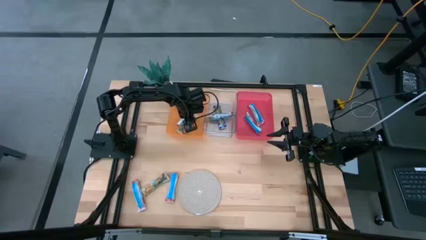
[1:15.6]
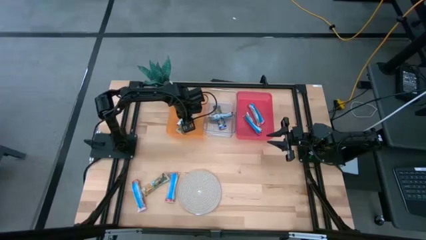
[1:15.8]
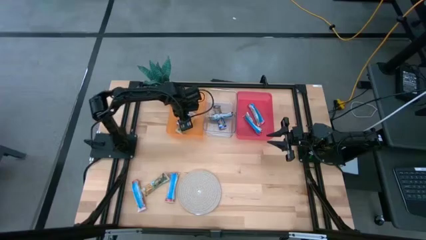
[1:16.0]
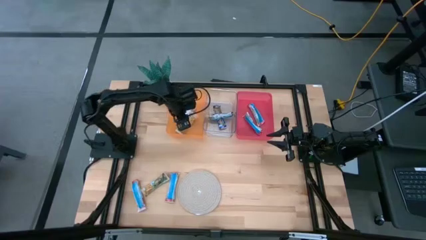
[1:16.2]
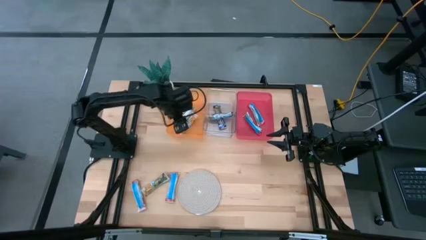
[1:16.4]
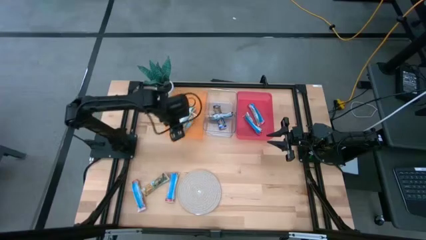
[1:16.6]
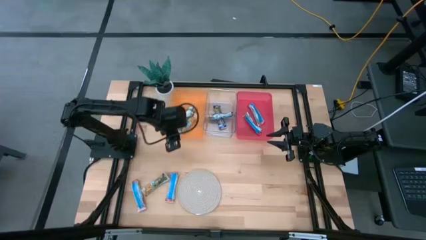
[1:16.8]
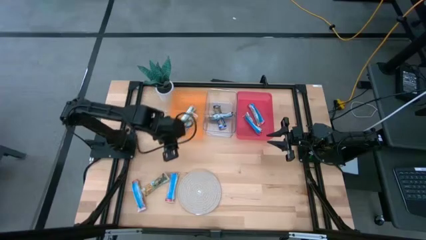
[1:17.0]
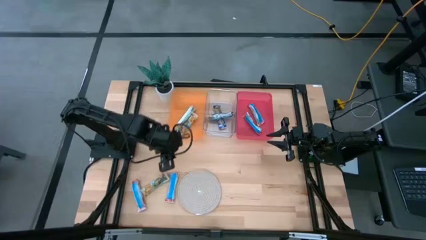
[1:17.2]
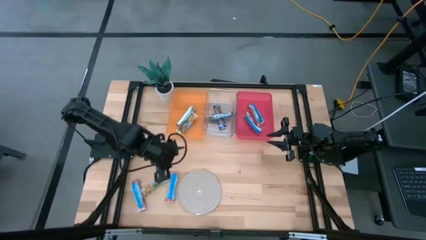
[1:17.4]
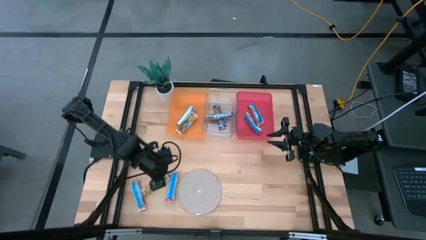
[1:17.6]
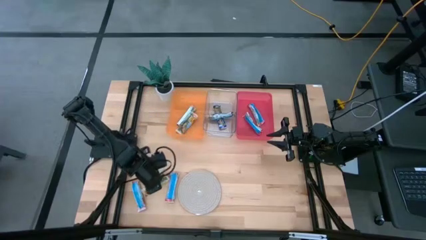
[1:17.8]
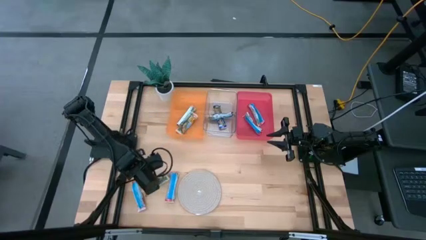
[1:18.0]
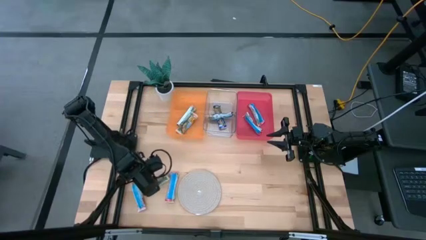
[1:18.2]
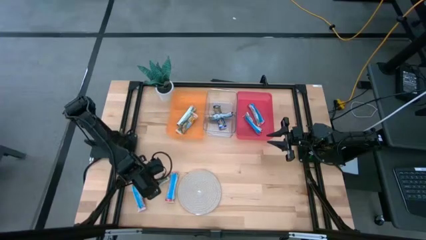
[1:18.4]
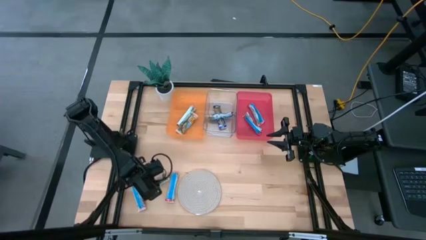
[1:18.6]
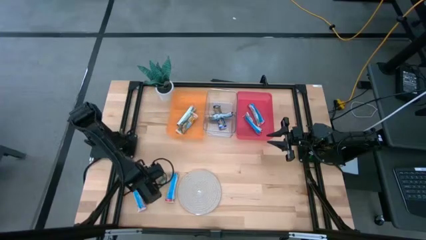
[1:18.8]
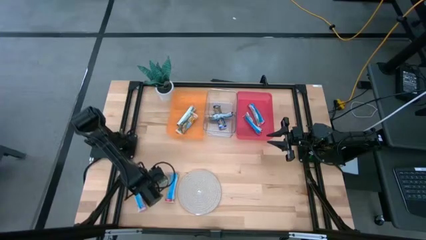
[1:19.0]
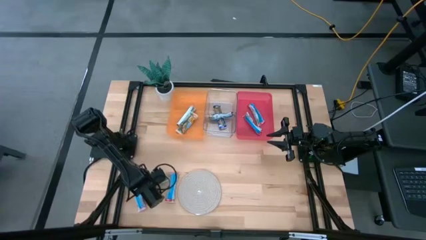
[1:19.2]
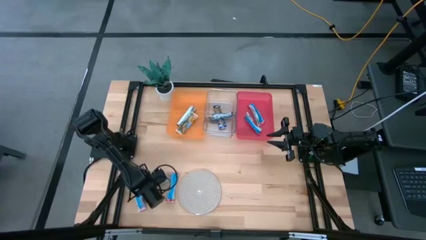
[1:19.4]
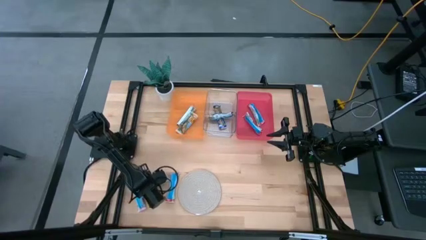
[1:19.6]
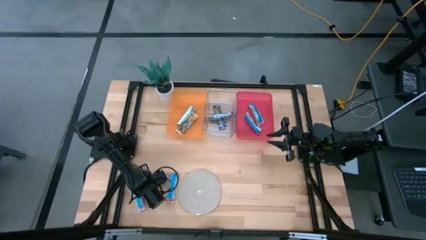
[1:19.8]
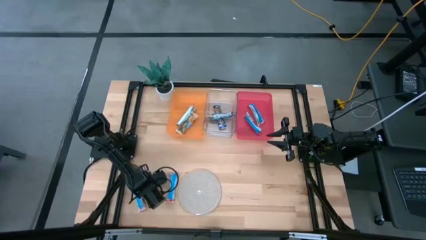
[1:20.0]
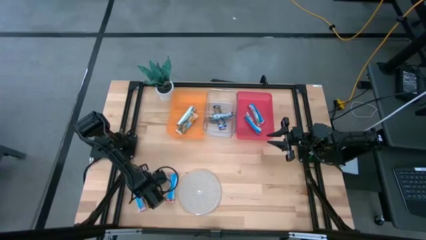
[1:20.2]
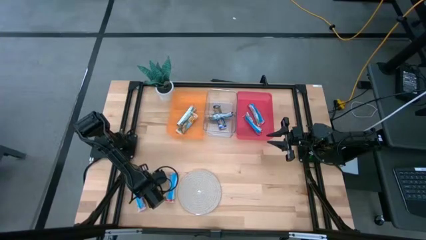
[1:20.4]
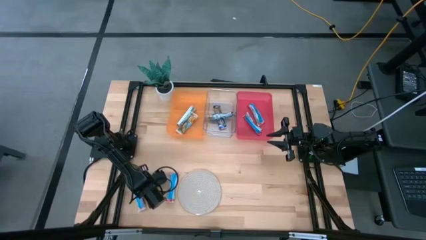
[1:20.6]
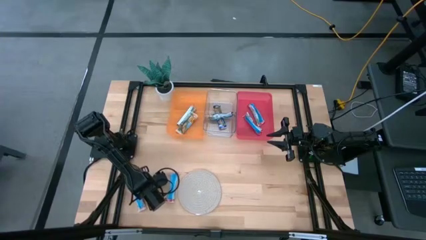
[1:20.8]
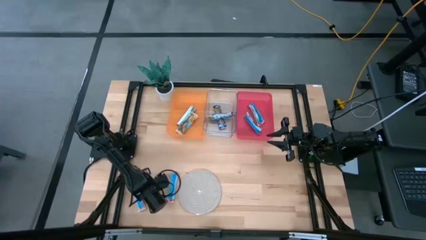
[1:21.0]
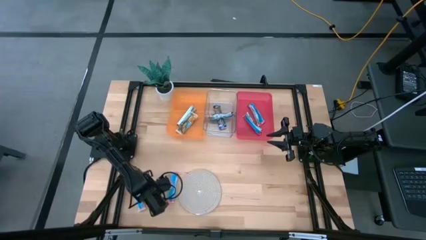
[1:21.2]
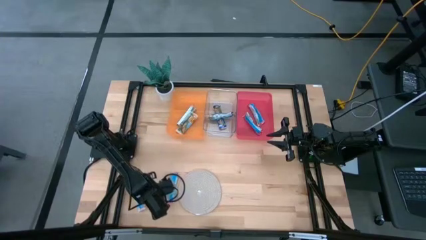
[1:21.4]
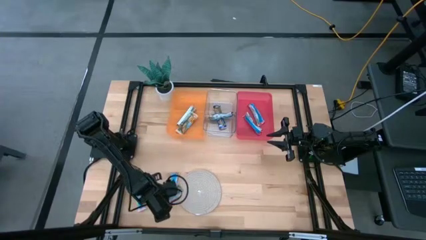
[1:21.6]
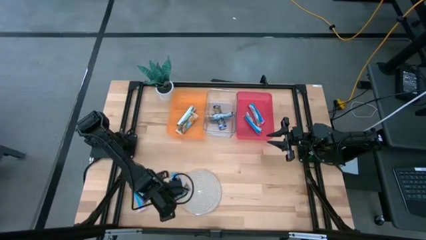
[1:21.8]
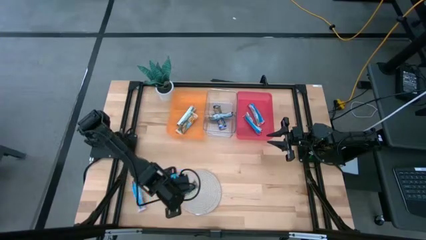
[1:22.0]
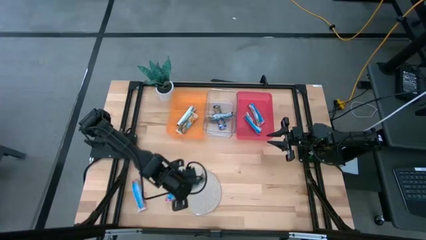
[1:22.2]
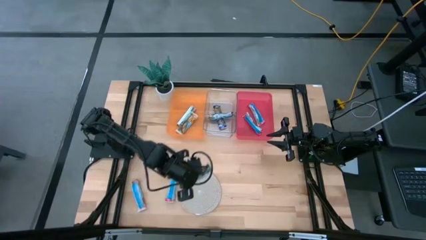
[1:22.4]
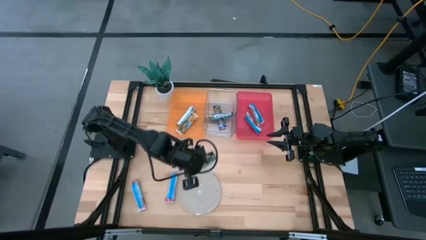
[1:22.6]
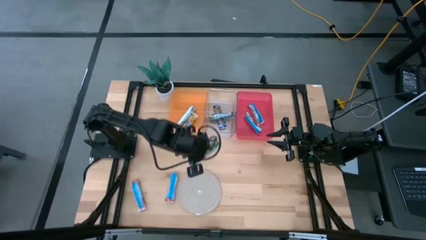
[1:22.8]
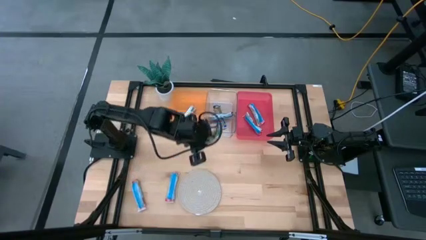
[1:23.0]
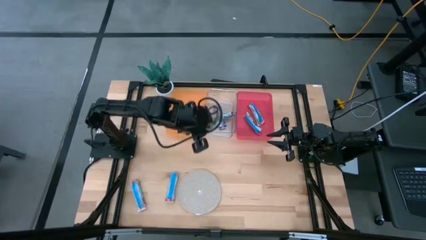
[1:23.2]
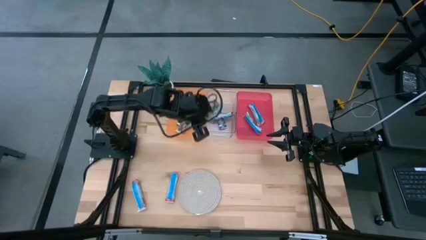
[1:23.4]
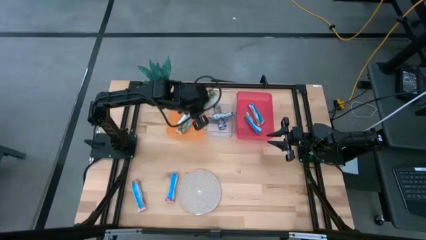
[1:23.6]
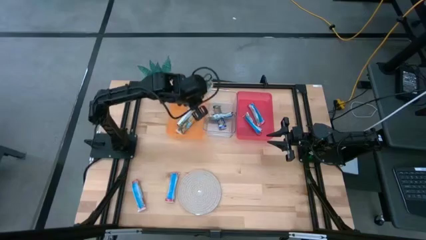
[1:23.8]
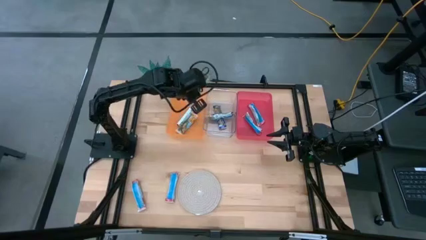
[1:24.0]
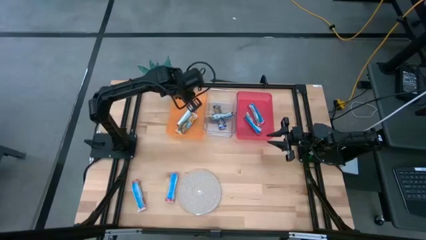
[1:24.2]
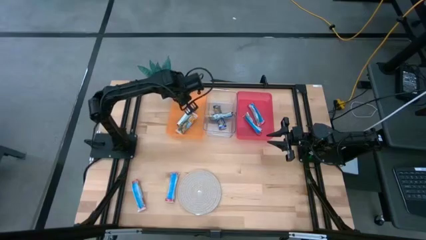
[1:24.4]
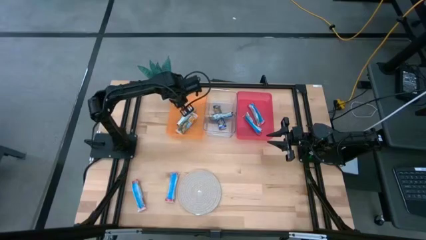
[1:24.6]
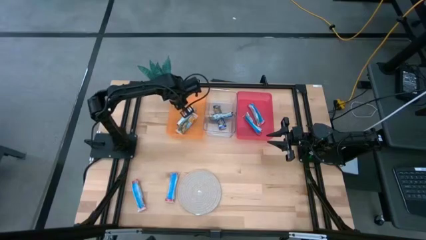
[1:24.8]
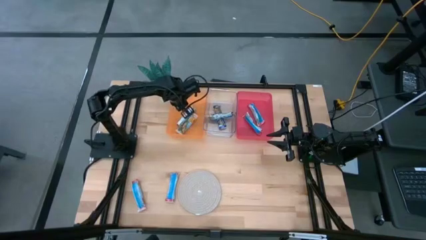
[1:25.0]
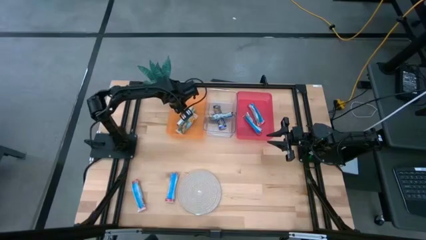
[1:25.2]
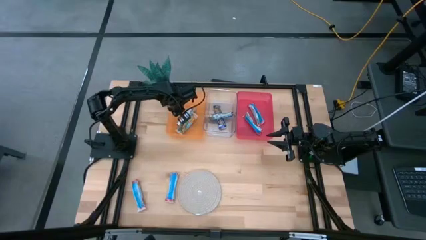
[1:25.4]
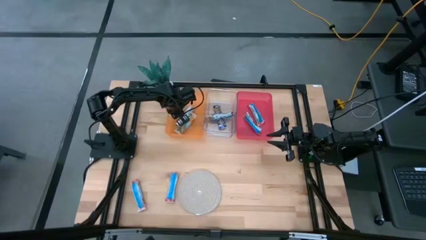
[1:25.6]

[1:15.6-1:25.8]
Task: Pick and place Granola Bars by type
Put the orange granola bar into the orange bin

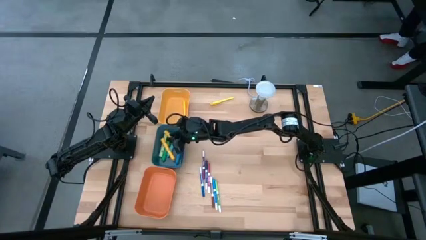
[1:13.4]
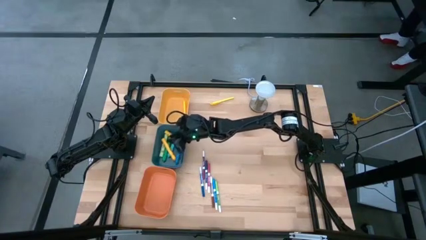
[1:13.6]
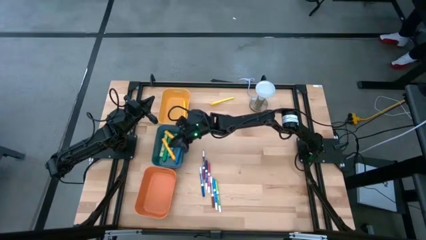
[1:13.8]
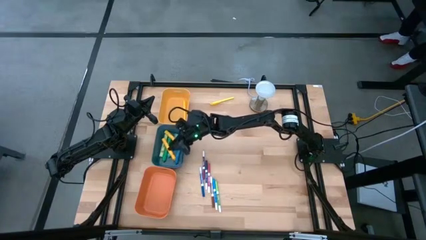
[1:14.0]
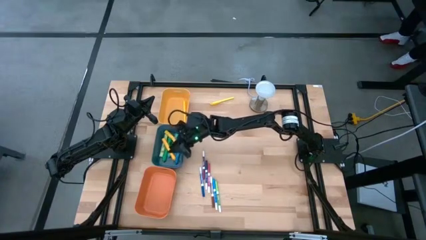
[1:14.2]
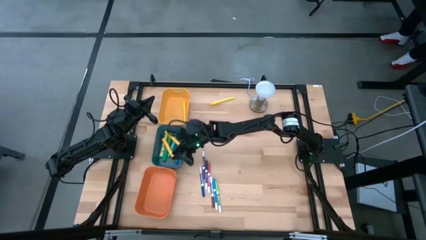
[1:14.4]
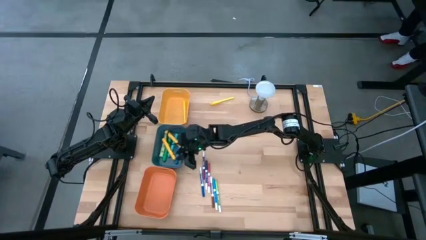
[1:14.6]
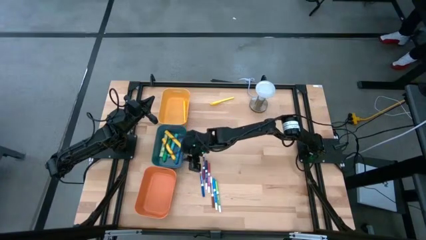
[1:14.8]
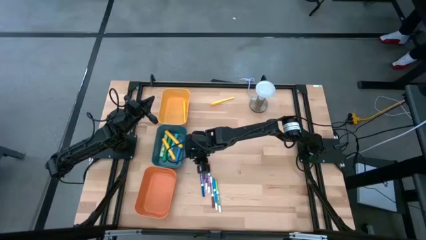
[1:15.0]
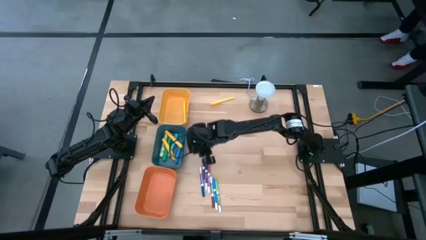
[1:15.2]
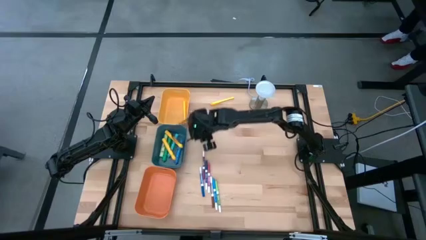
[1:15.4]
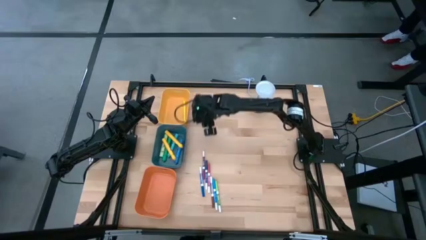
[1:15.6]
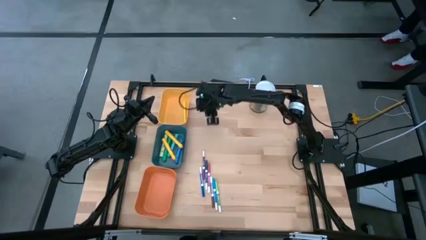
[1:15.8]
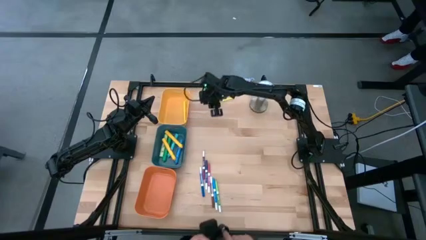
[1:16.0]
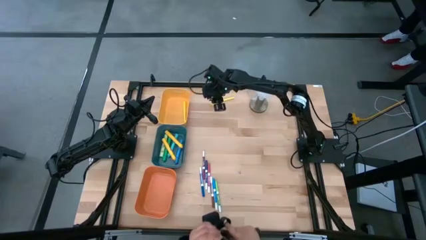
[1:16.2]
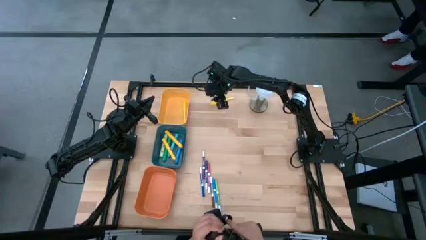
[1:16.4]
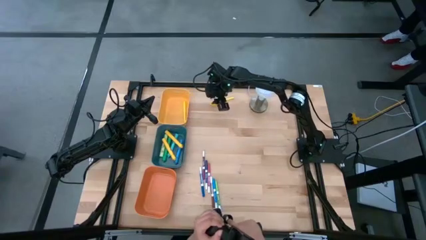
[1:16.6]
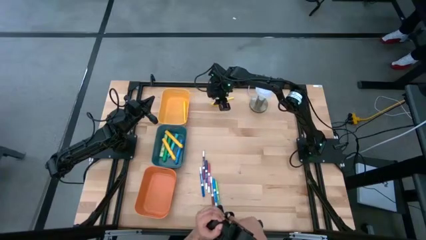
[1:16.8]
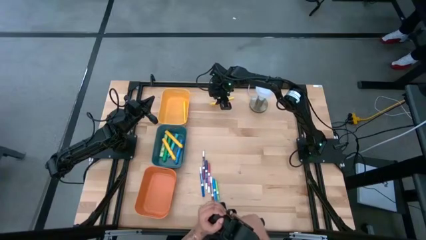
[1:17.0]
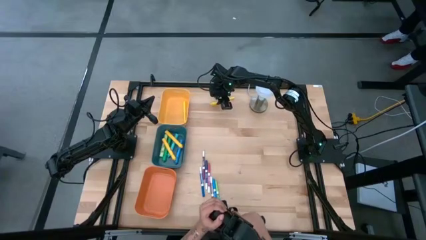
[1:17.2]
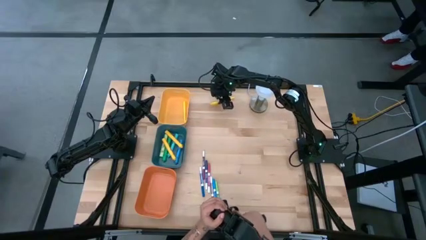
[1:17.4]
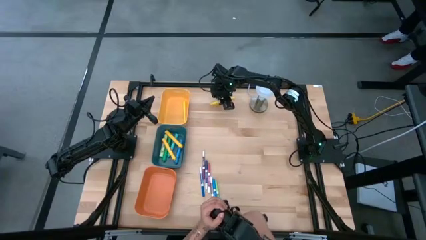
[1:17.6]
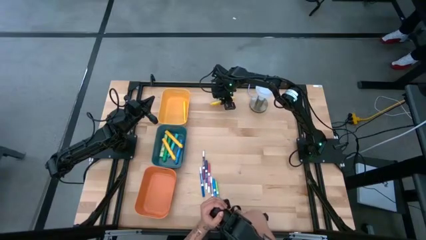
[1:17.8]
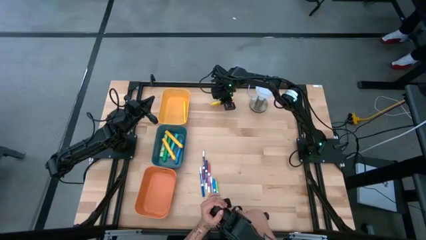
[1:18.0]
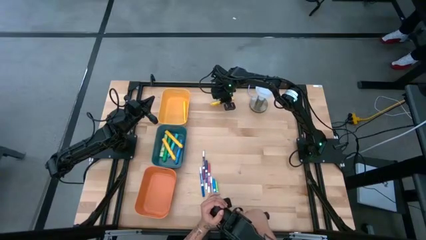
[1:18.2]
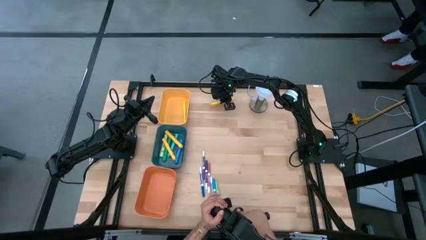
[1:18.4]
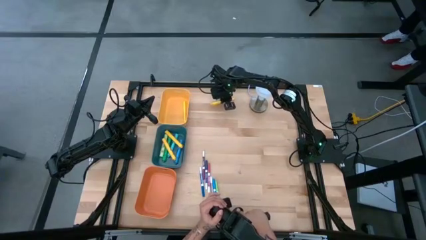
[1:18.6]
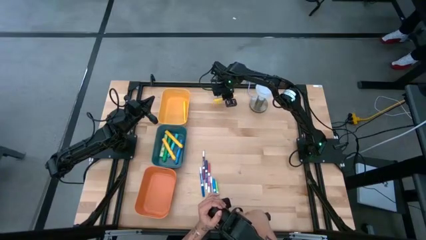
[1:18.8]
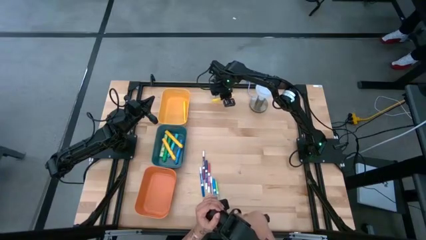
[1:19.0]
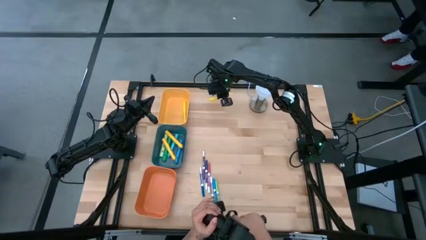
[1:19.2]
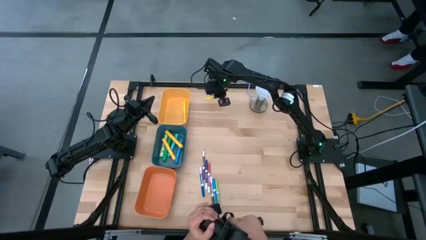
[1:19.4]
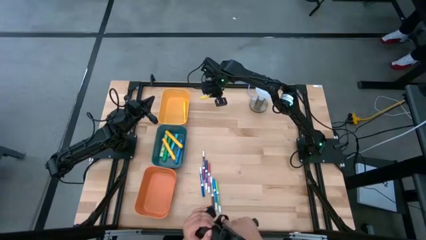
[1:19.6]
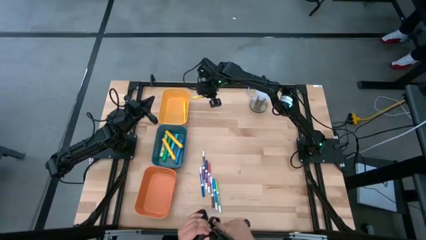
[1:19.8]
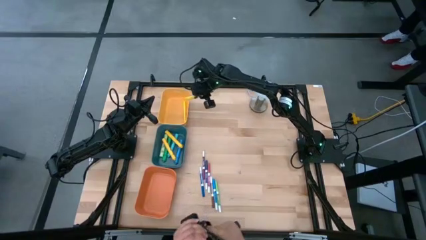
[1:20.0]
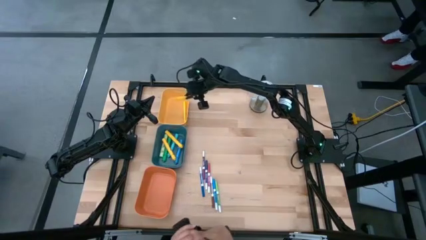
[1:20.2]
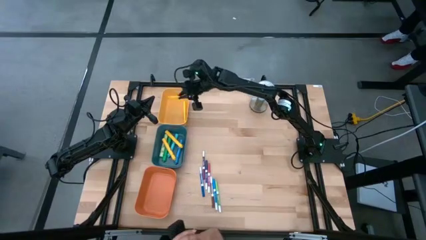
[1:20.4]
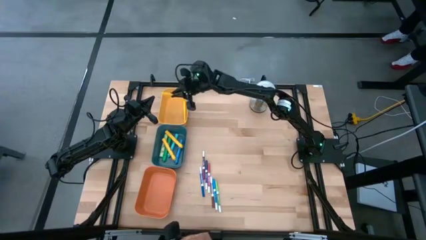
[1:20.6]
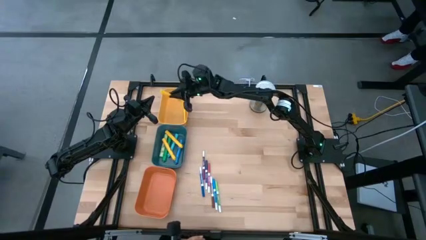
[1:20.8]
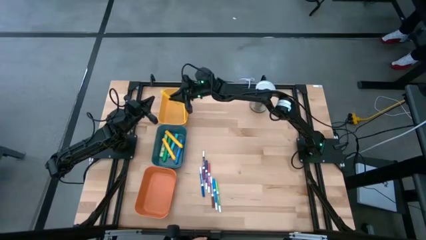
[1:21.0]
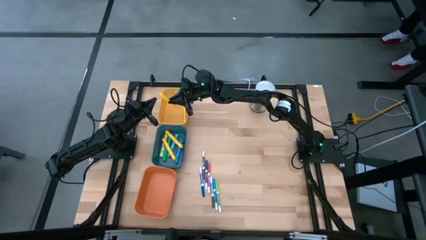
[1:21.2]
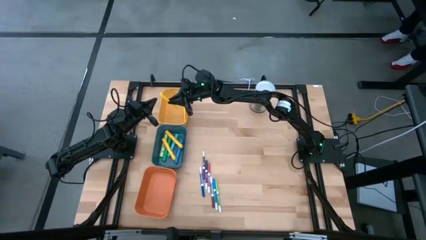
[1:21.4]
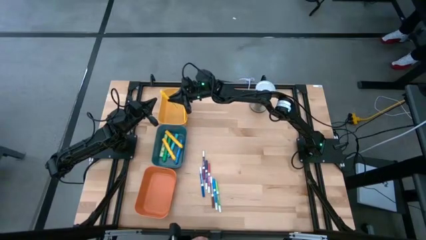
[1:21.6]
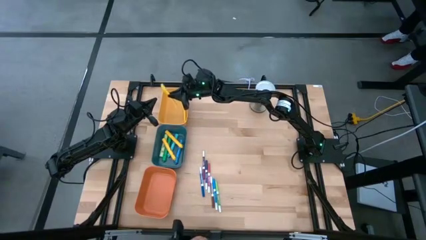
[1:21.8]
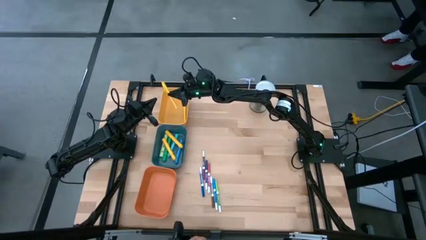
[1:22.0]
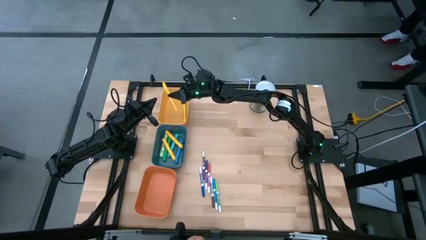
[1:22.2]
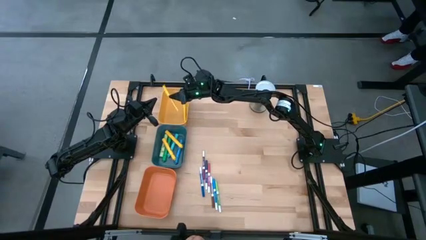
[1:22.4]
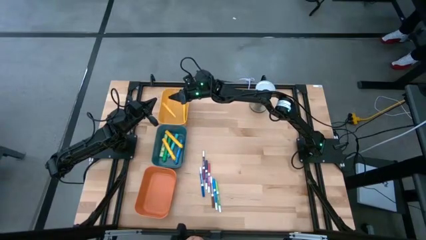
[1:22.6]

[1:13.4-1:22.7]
Task: Pick & Place Markers
Put the yellow pen into the yellow bin
